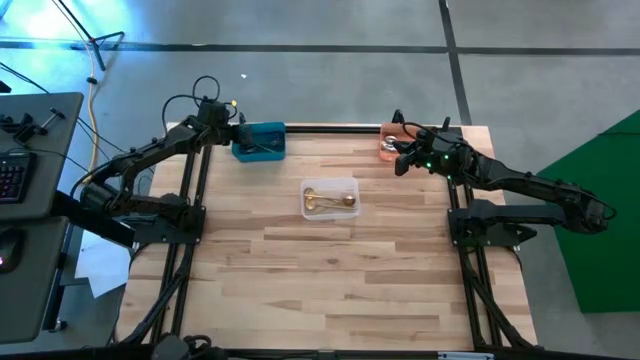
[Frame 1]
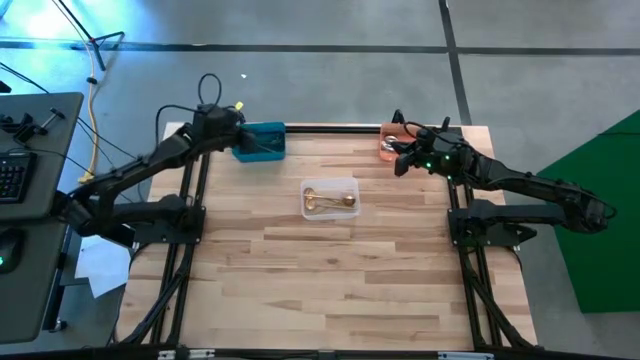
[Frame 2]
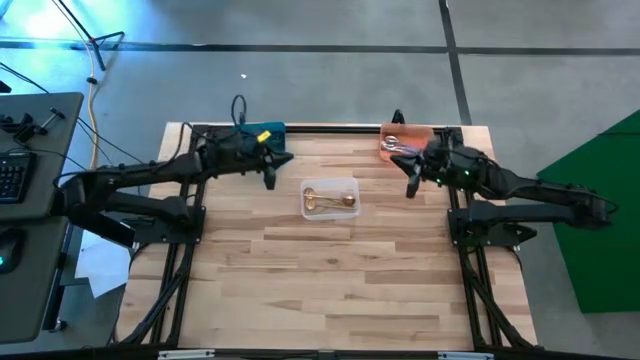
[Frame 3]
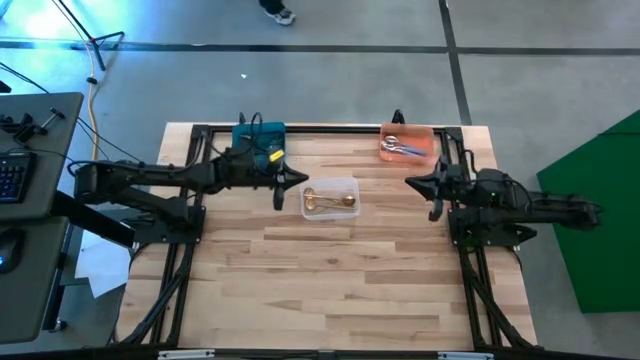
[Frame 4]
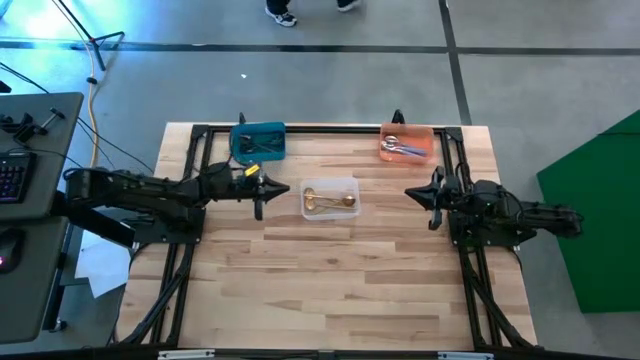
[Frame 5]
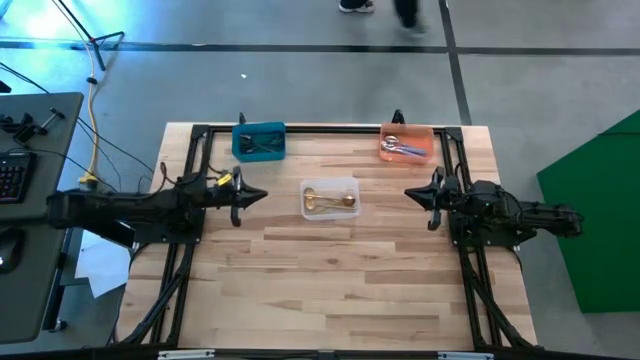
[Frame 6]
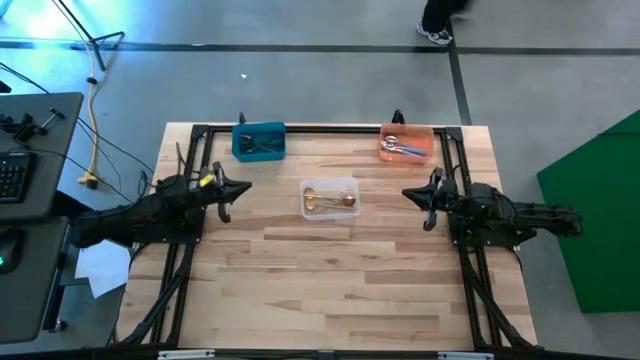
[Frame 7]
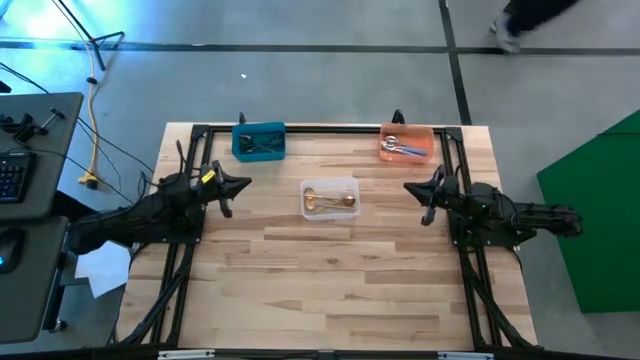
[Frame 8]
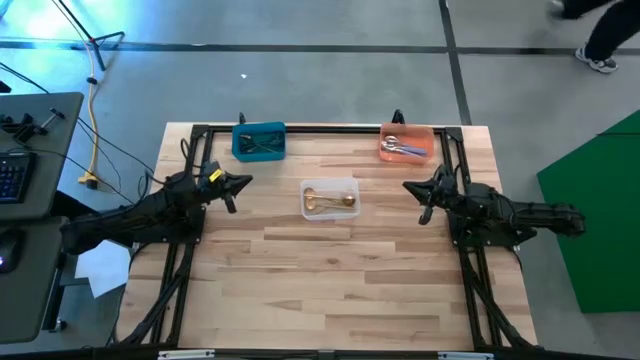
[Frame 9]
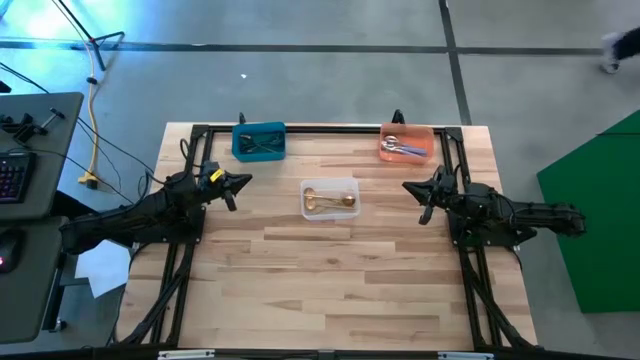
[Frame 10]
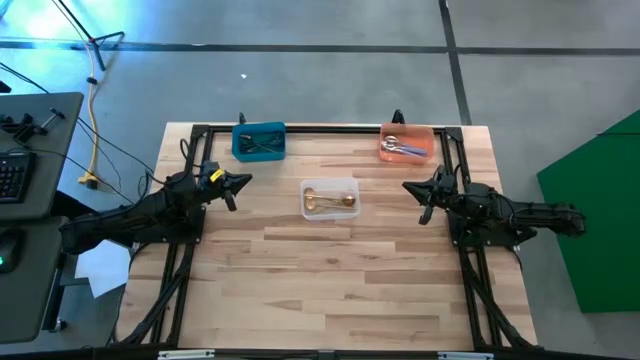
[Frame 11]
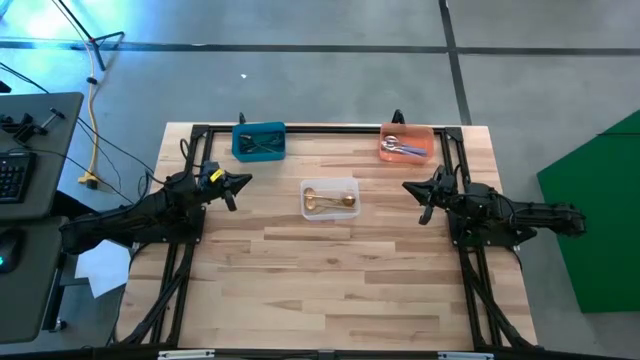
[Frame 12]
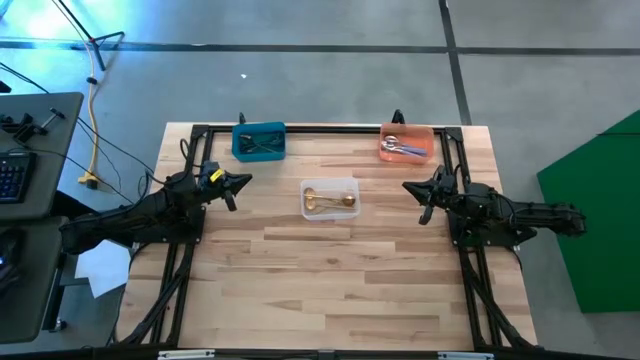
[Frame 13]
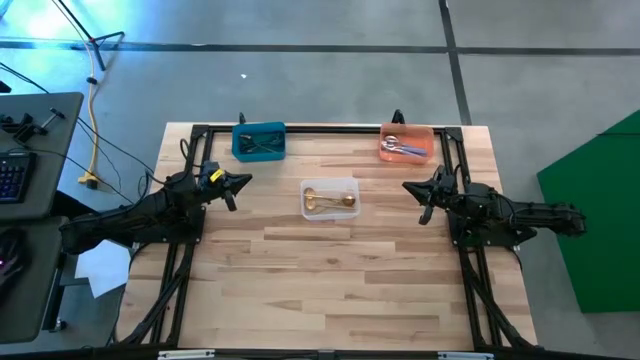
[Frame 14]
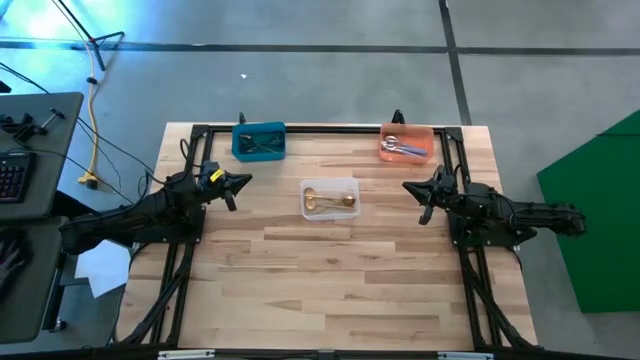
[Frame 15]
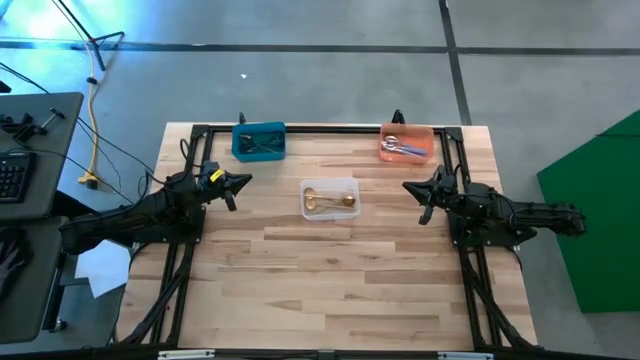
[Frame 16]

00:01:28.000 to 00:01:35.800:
Task: Sort silverware by color (type)
Return to Home Position

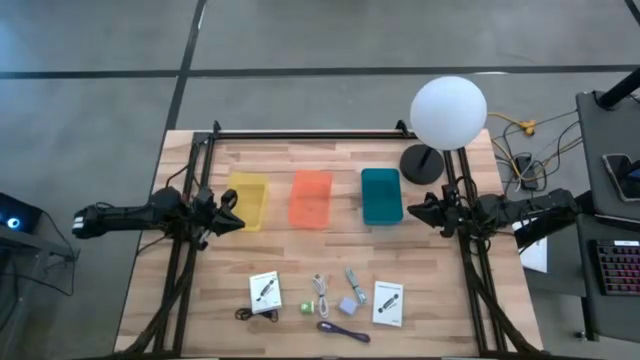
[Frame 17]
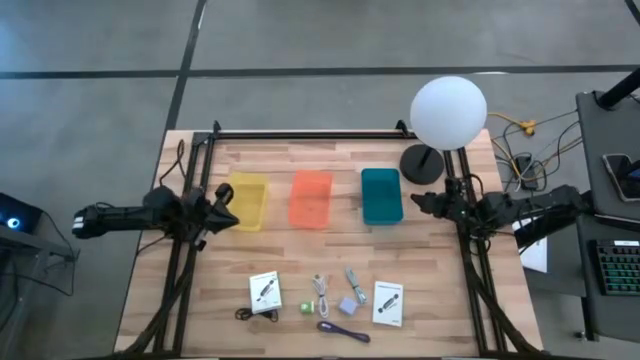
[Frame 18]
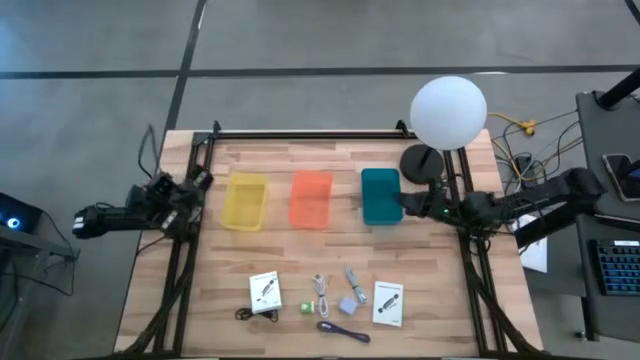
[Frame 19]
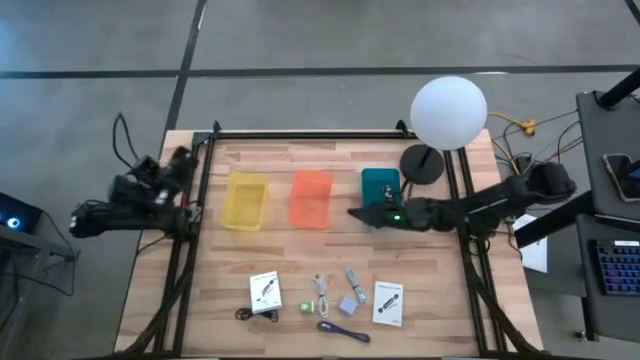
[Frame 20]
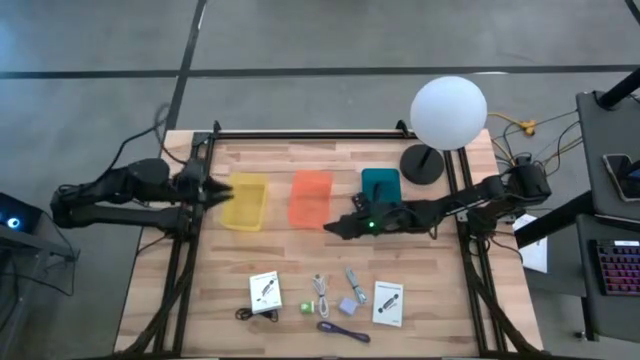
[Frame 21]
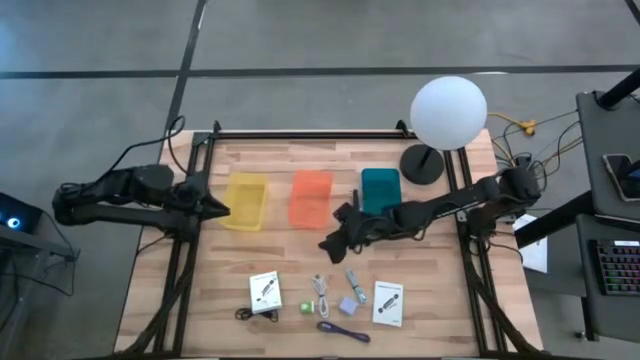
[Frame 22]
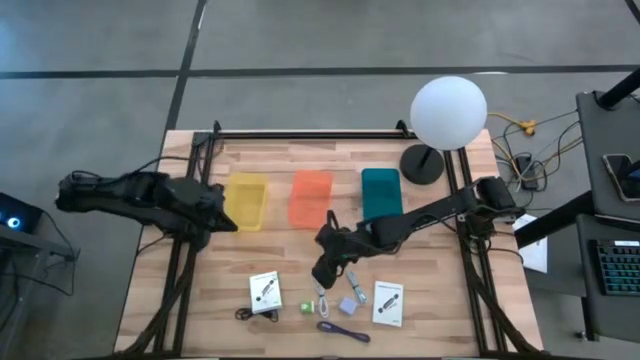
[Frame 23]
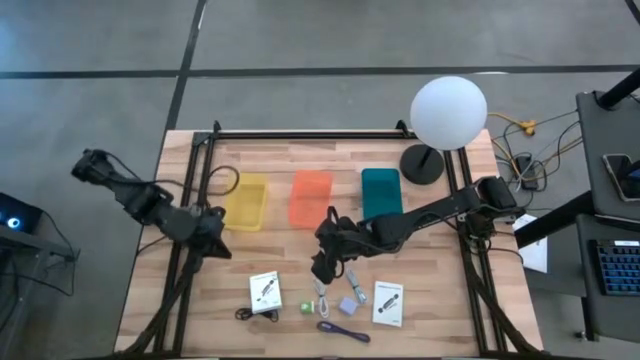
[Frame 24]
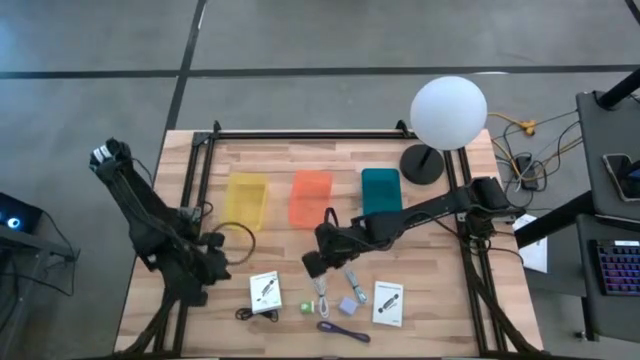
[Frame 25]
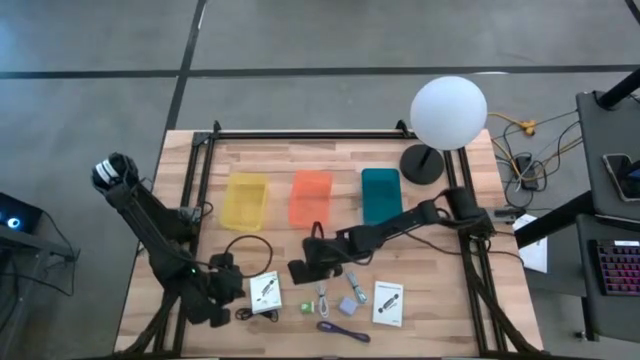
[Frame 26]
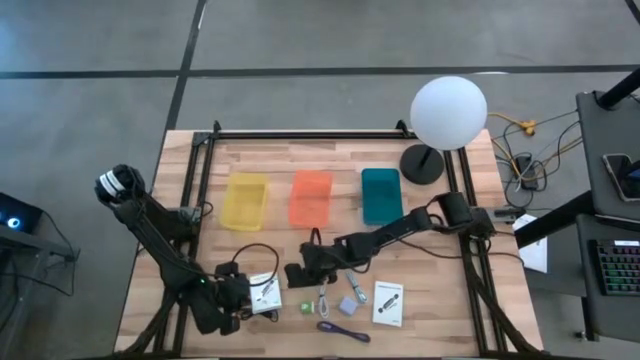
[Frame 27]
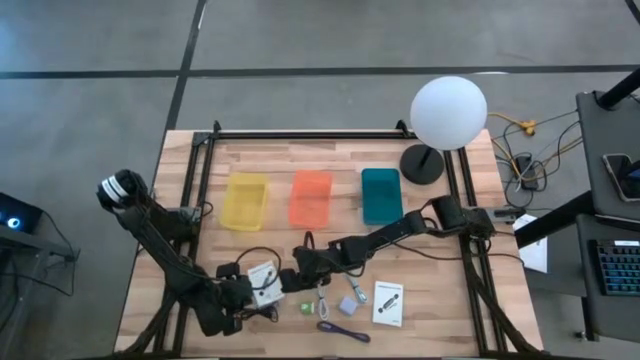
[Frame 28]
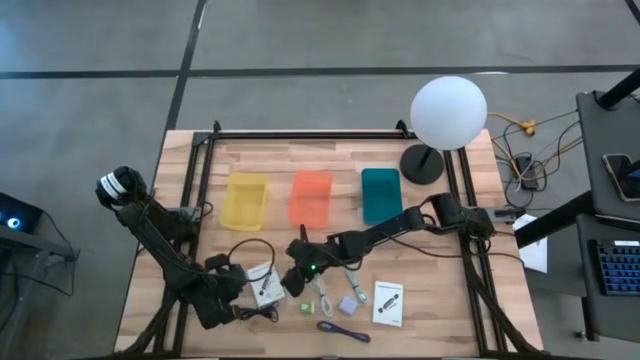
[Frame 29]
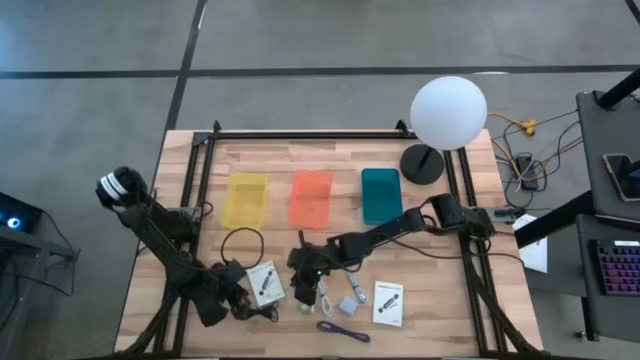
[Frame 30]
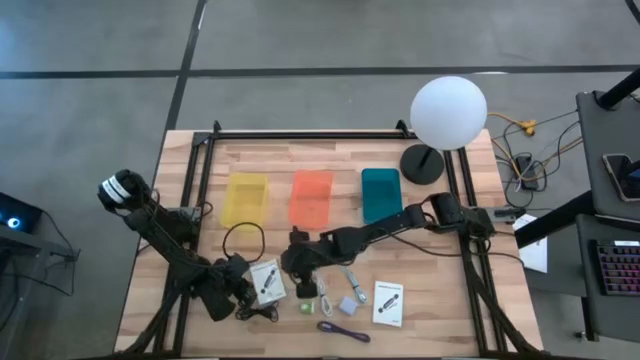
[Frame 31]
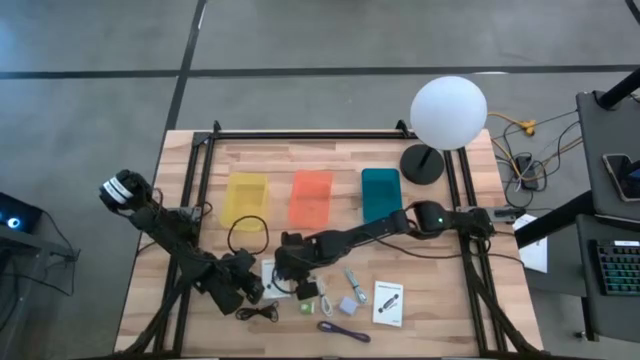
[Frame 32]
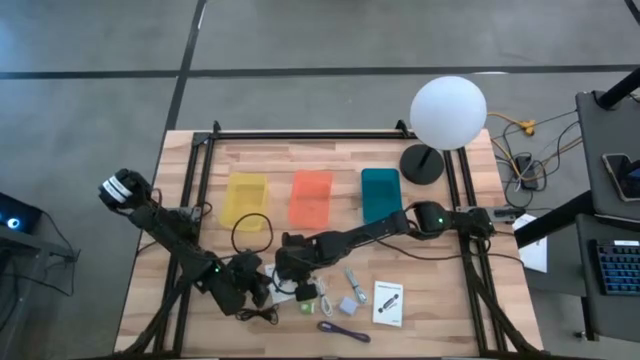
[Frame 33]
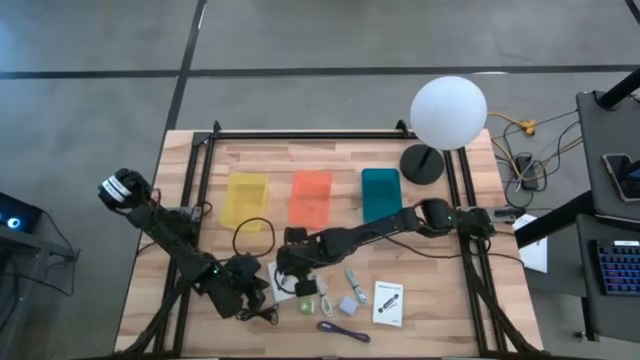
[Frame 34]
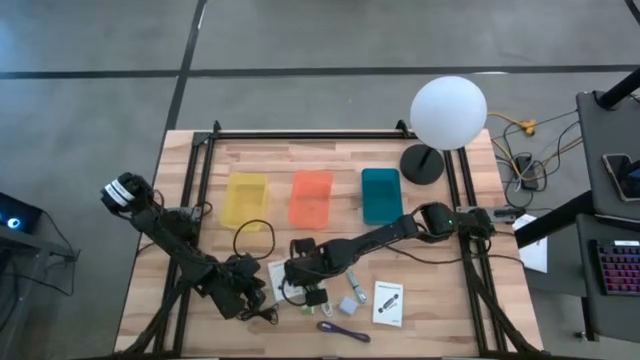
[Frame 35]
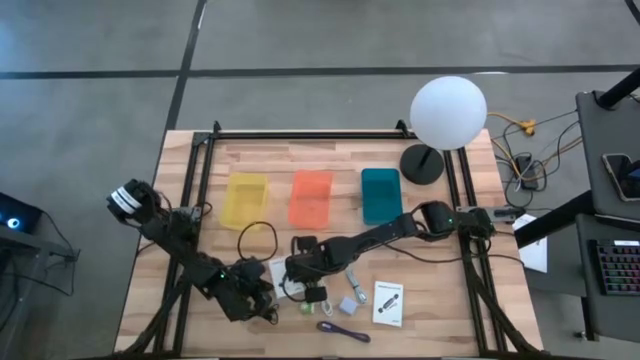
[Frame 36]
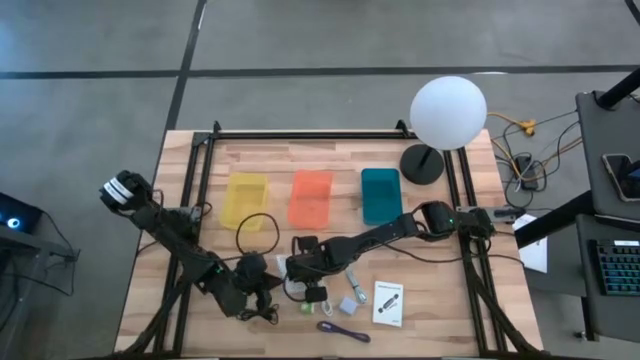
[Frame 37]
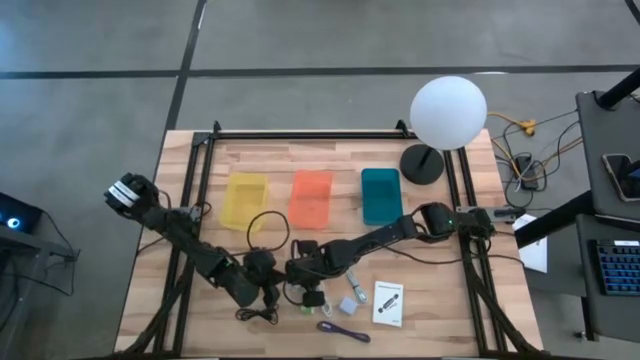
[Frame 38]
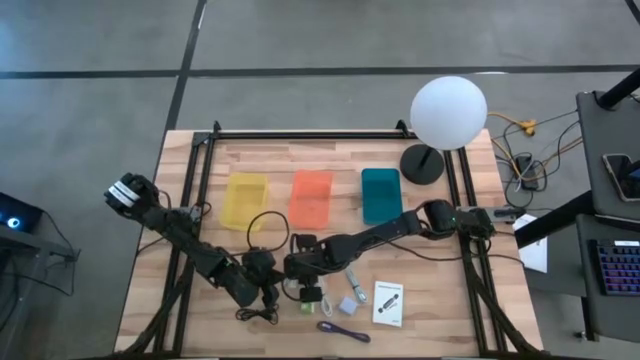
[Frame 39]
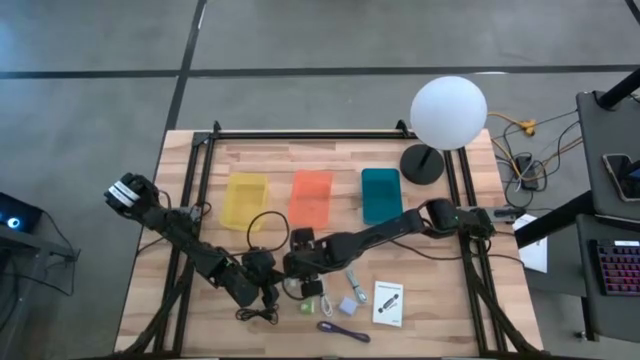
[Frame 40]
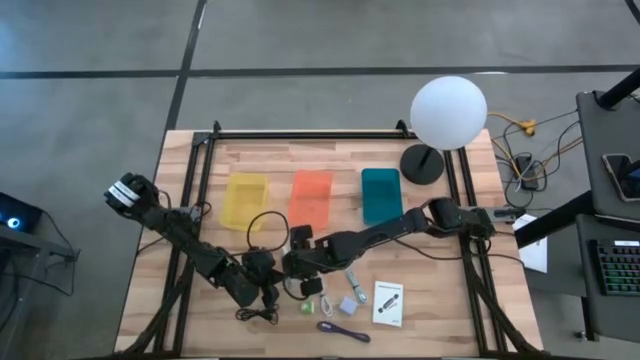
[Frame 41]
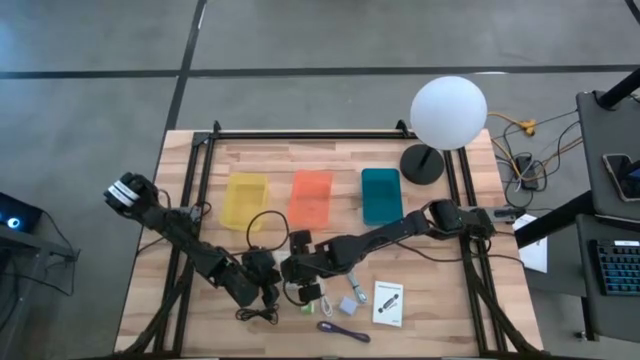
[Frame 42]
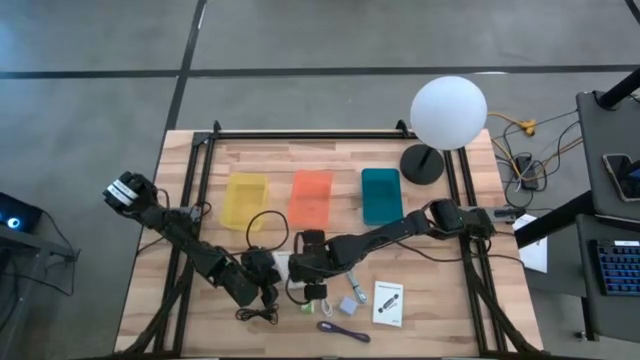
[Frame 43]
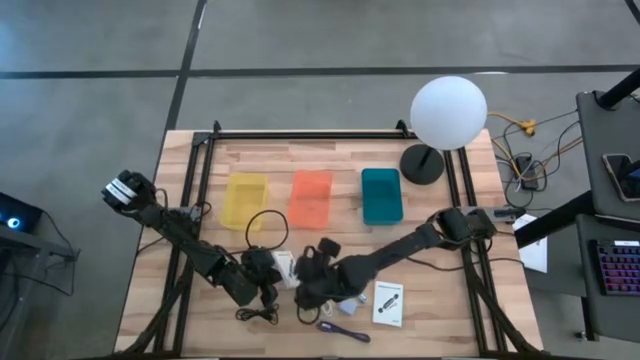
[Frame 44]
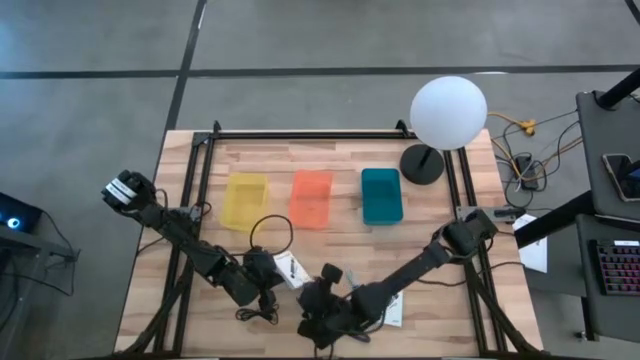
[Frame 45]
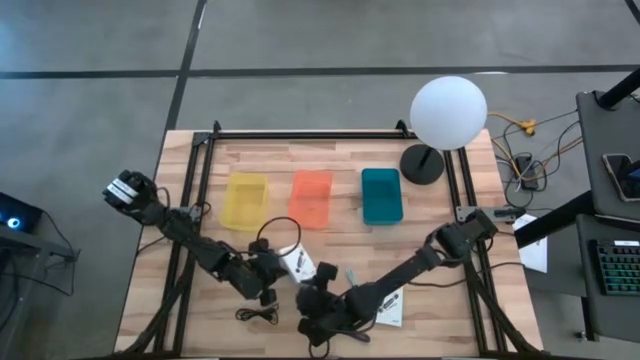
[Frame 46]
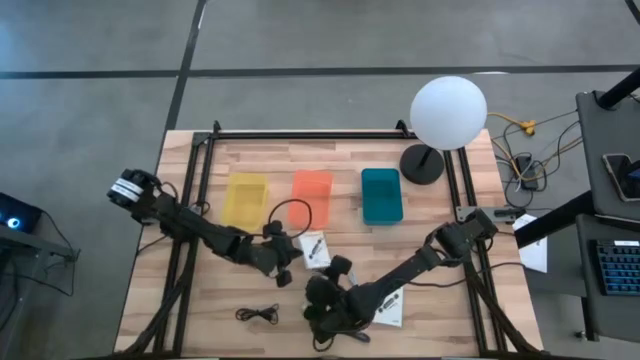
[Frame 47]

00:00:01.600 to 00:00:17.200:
Task: Pick and place items into bin
Put the left white card reader box into the blue bin
